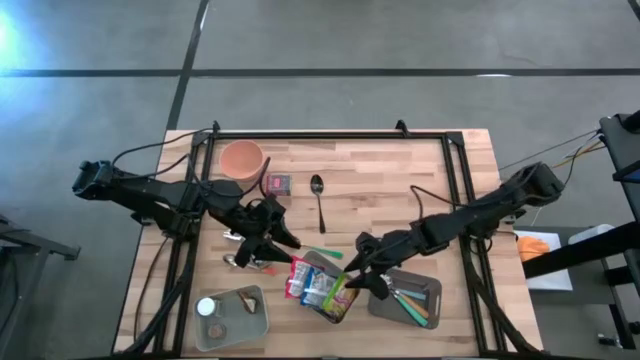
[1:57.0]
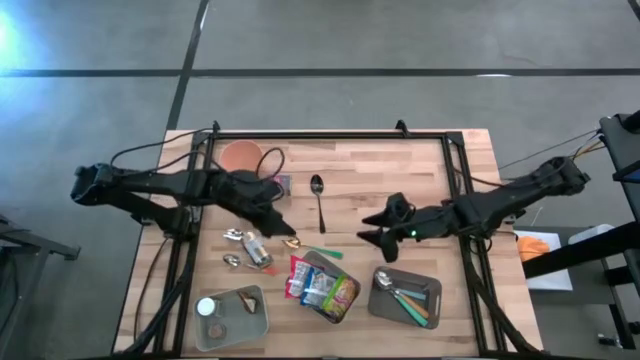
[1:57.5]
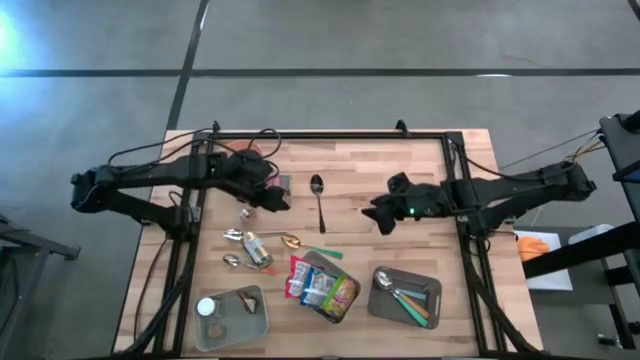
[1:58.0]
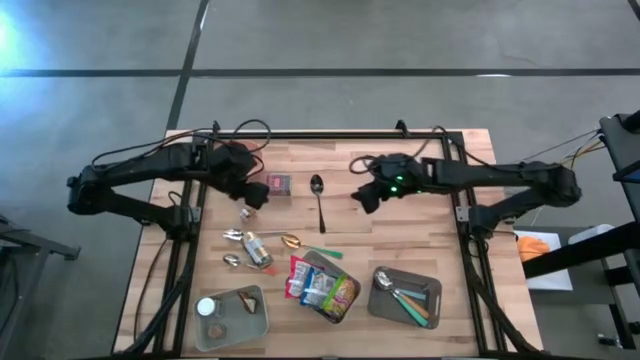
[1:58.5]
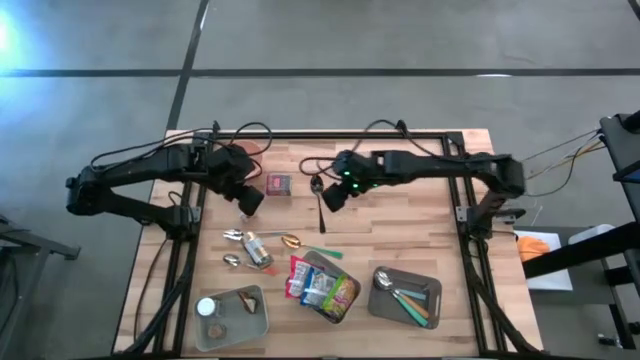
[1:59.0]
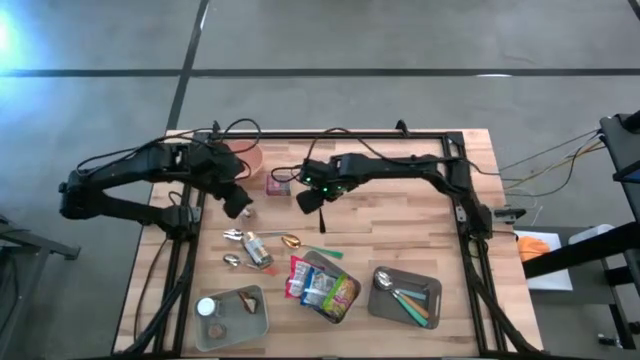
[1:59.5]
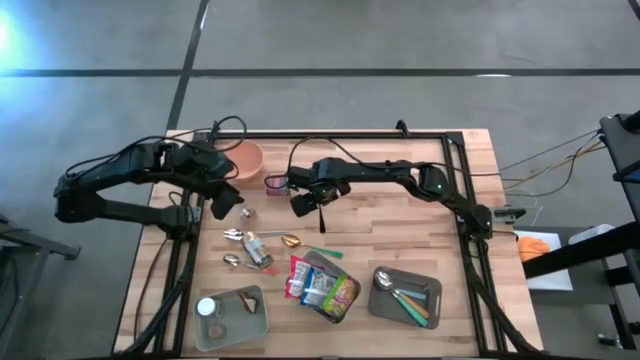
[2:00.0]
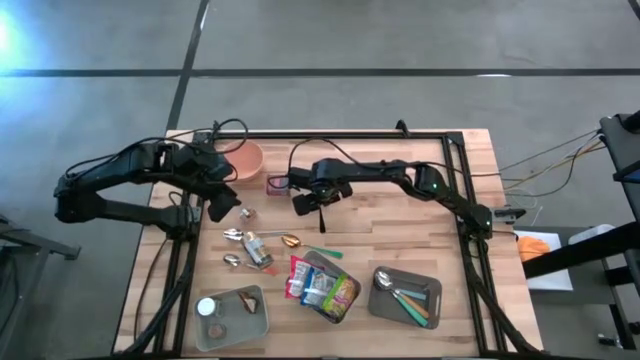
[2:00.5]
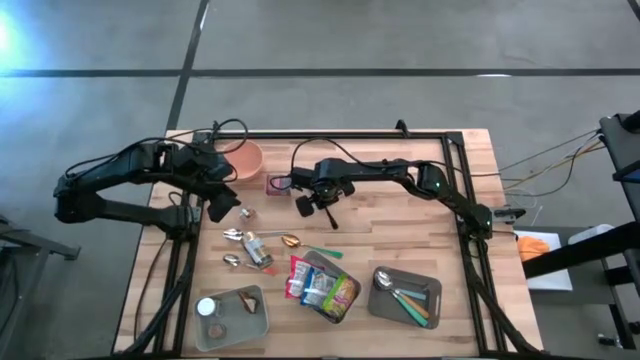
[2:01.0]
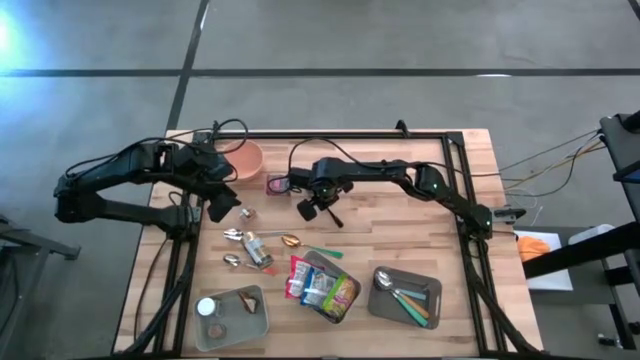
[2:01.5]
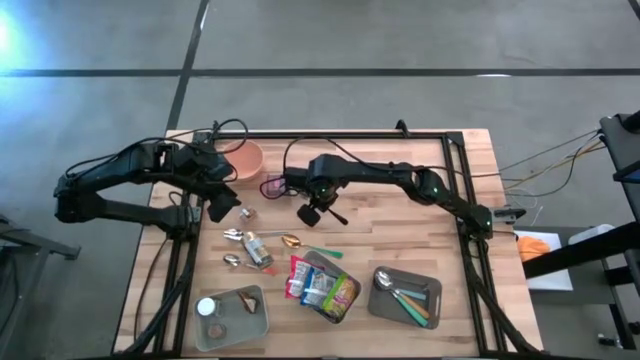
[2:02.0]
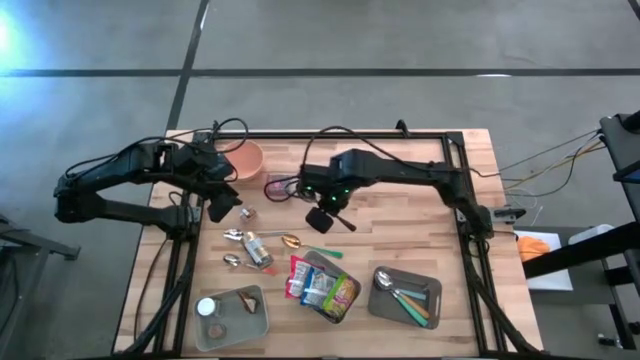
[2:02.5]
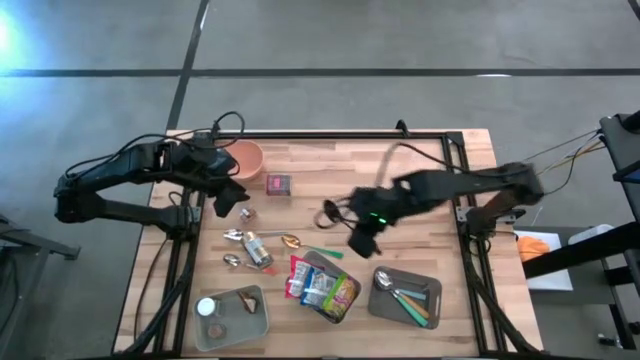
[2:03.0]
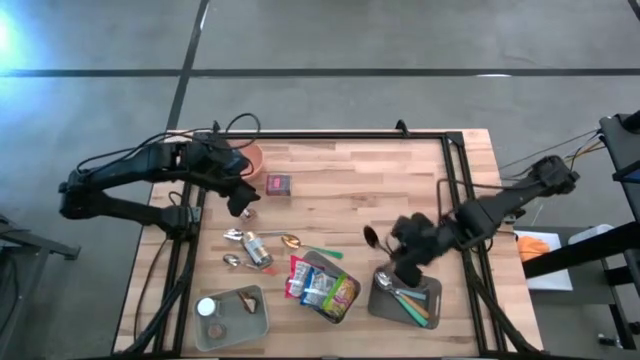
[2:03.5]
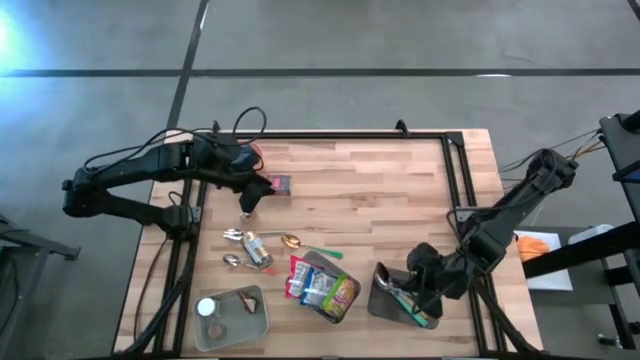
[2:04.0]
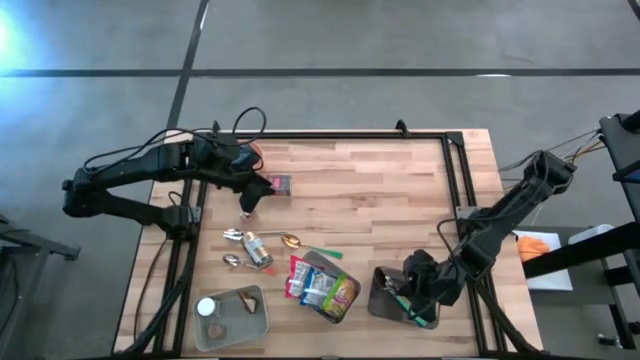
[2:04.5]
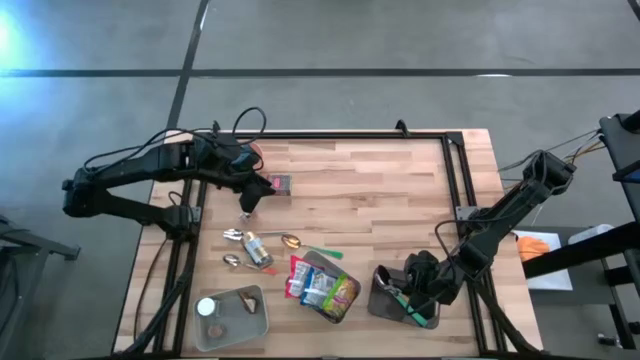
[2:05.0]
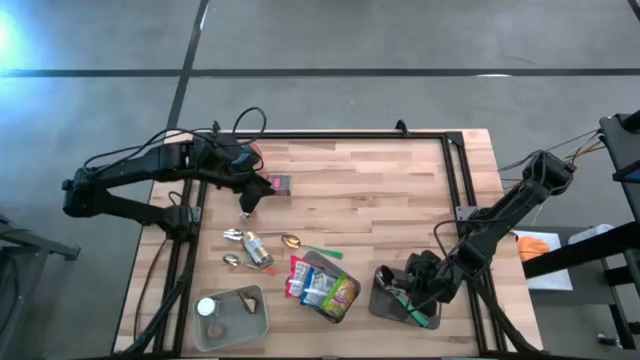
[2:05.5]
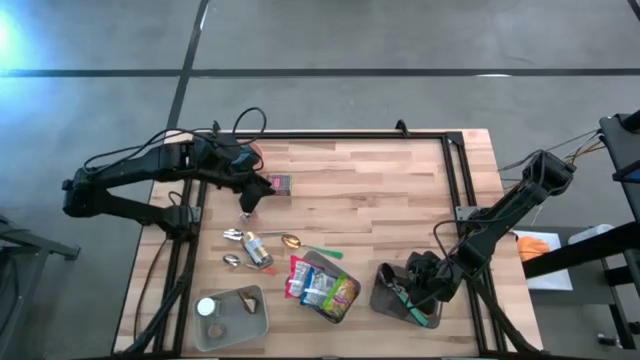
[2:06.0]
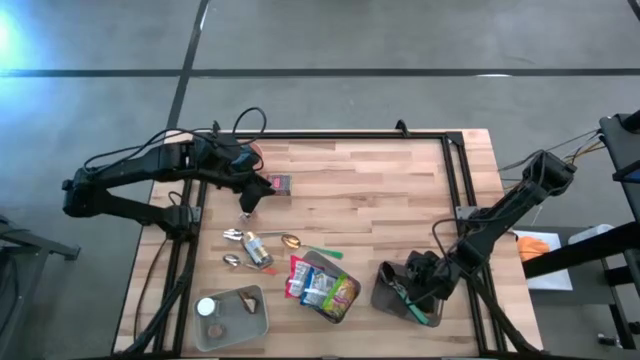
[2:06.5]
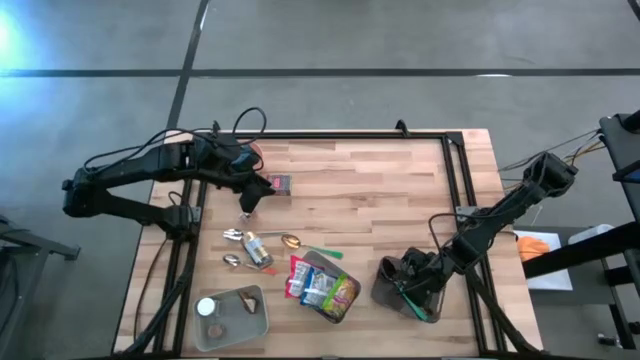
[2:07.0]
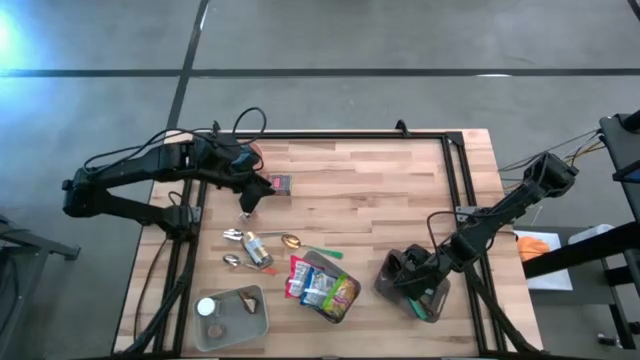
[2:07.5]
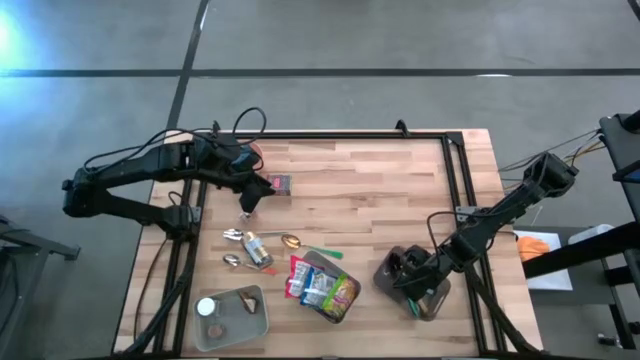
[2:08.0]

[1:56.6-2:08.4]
Put the black spoon into the black bin

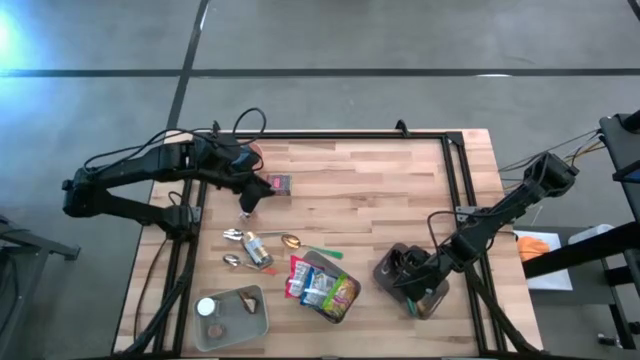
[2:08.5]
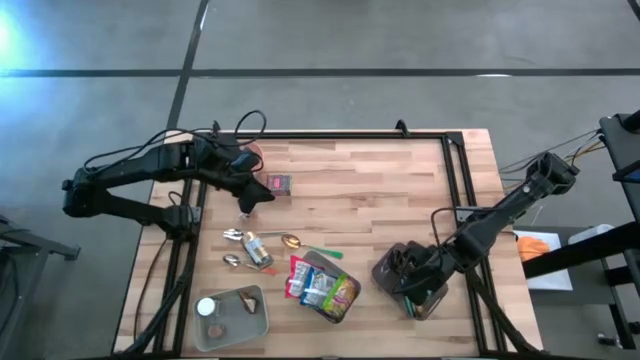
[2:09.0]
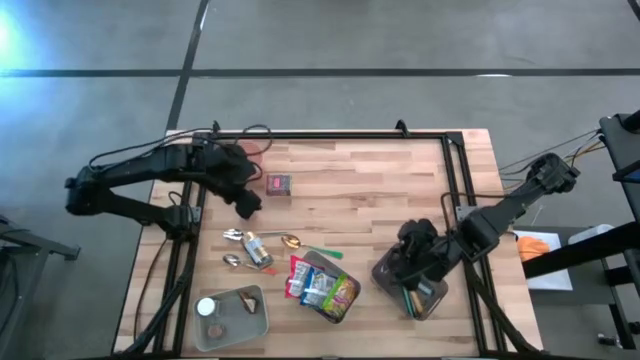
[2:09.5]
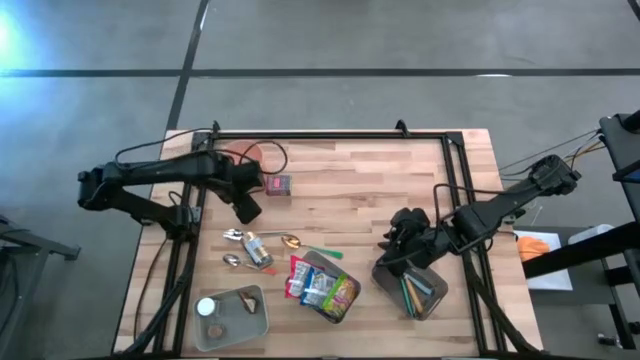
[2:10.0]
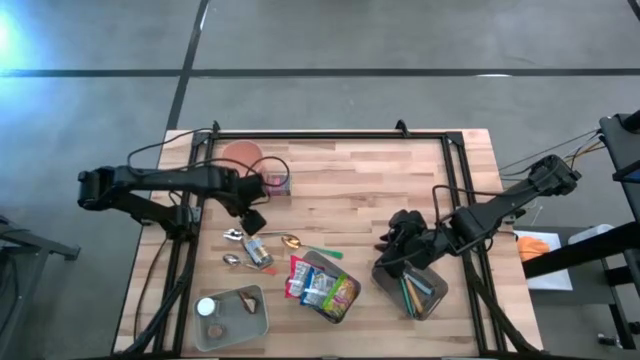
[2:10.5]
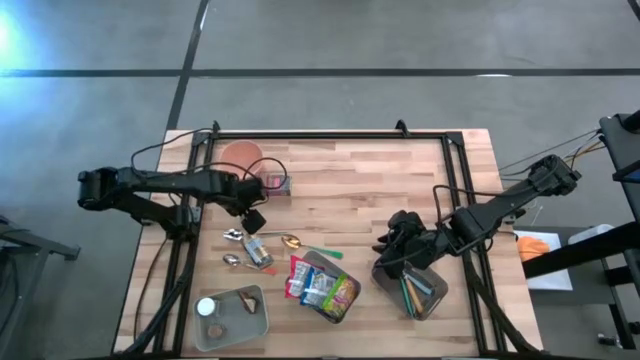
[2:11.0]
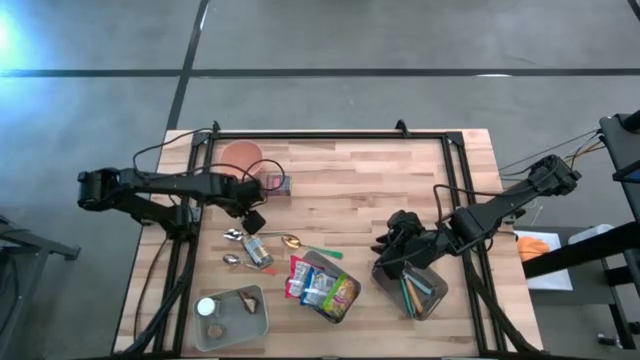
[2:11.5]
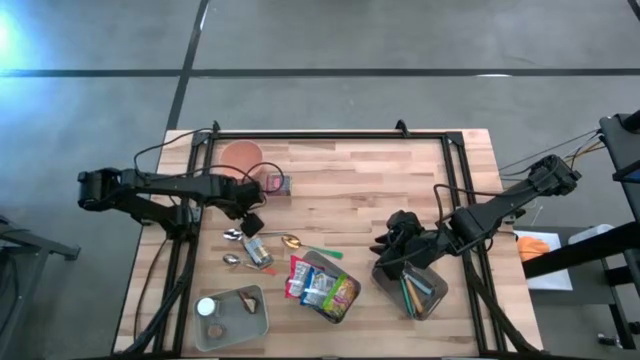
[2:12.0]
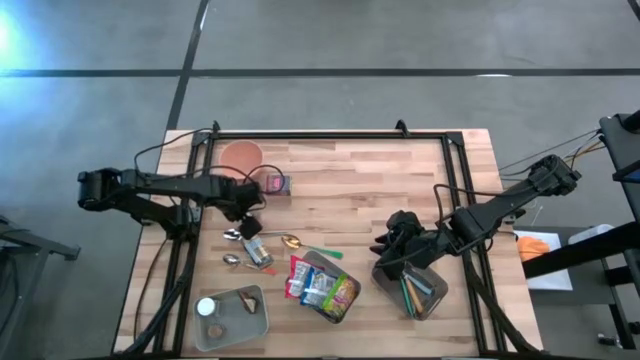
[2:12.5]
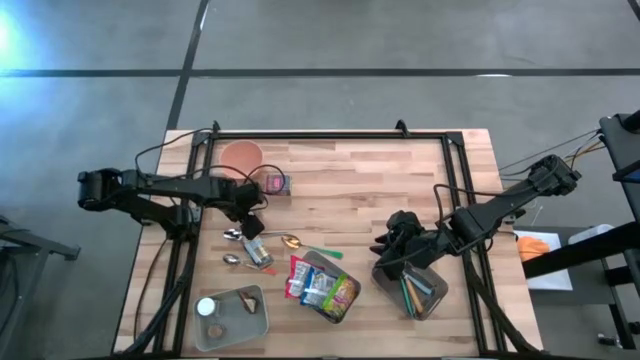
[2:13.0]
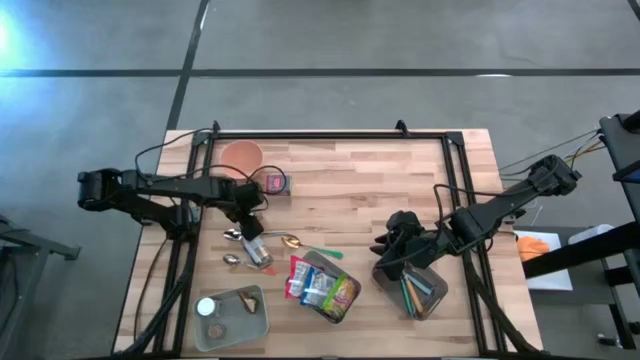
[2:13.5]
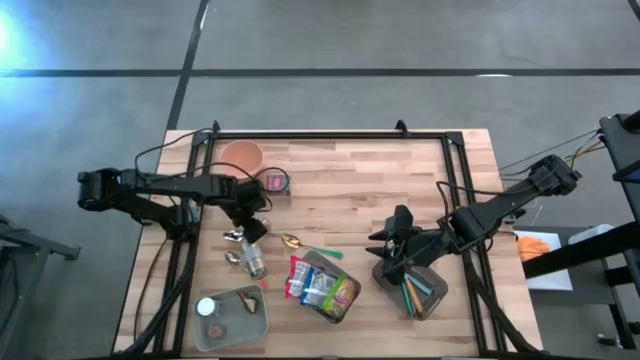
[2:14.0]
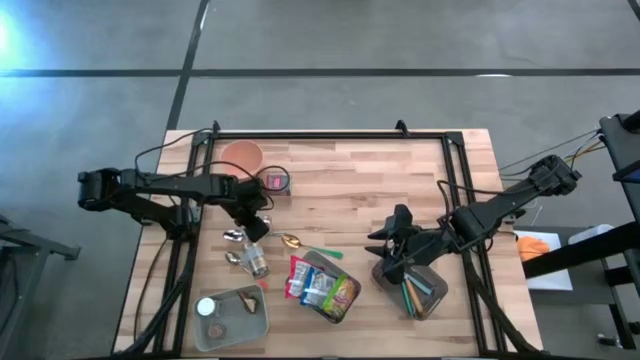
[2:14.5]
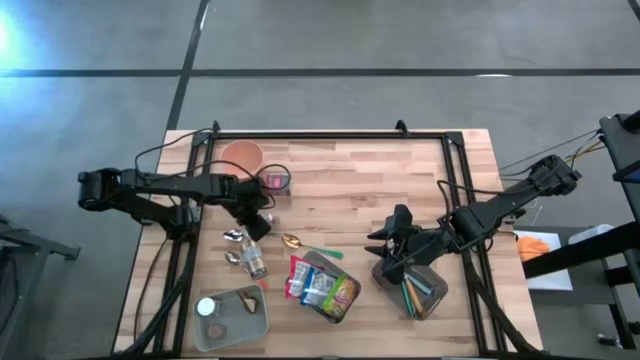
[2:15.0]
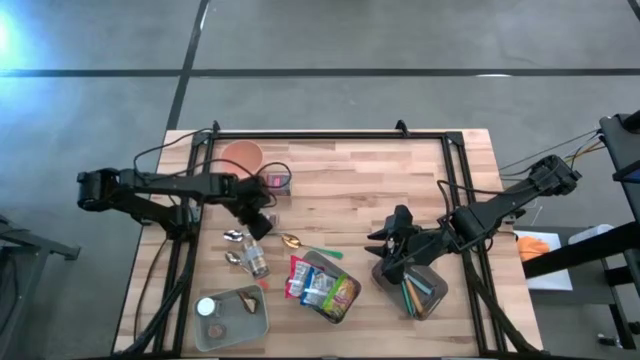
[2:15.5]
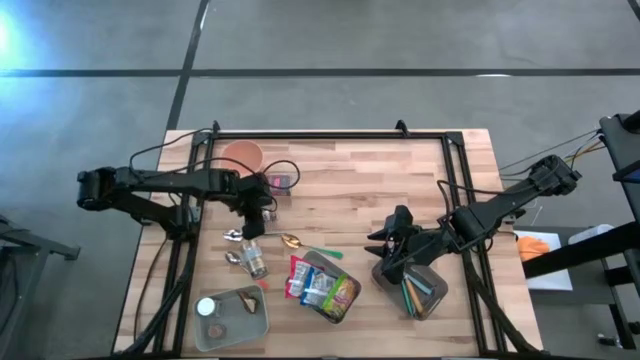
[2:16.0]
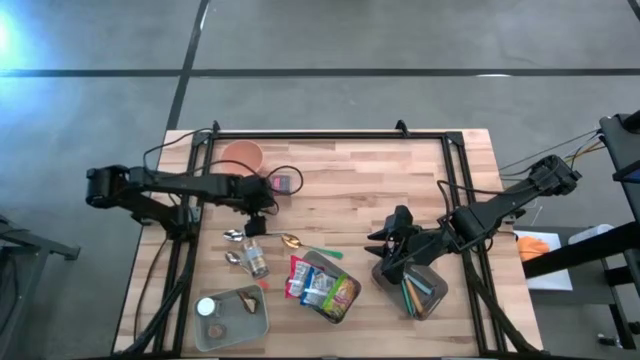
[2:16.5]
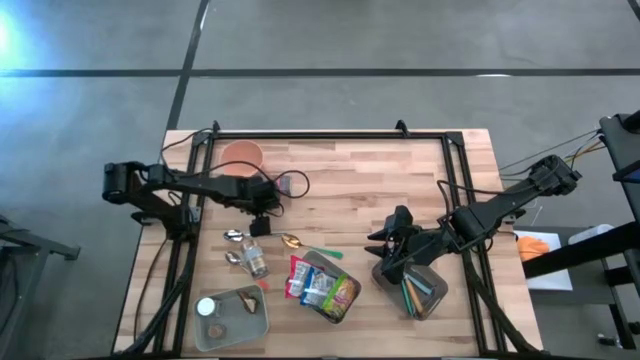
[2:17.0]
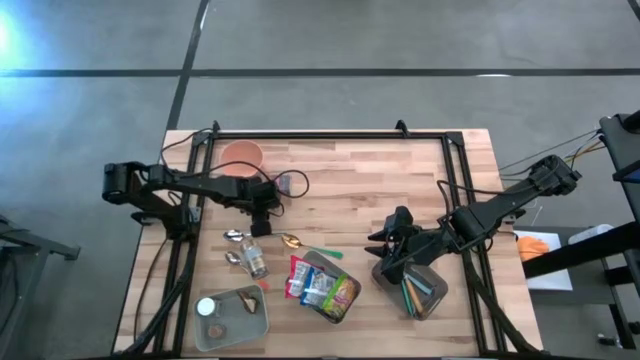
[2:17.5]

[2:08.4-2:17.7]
Put the brown seasoning bottle into the left gray bin
